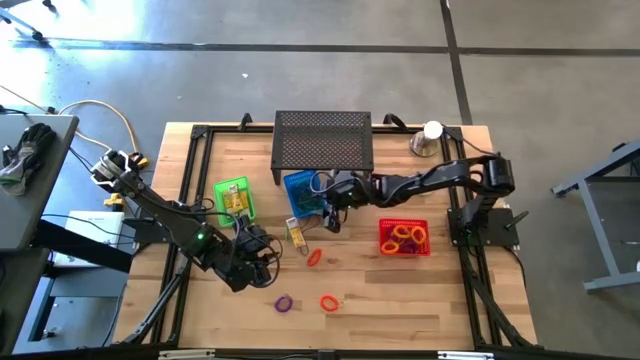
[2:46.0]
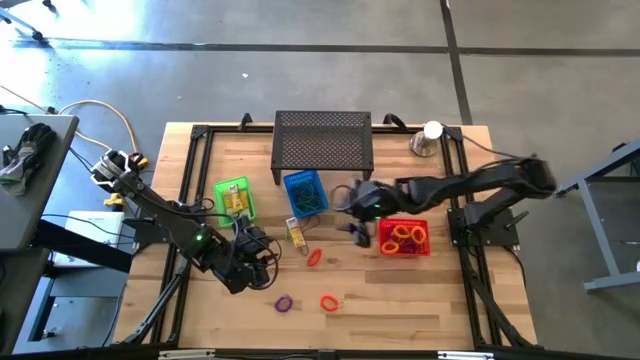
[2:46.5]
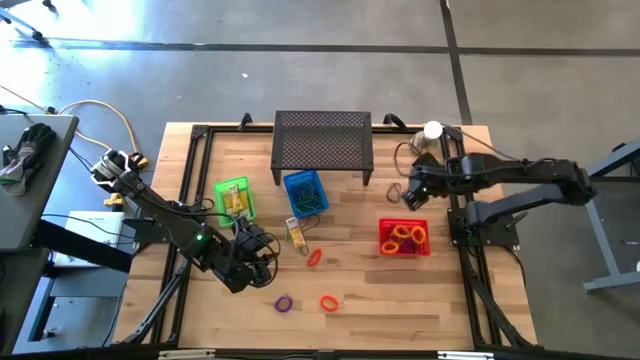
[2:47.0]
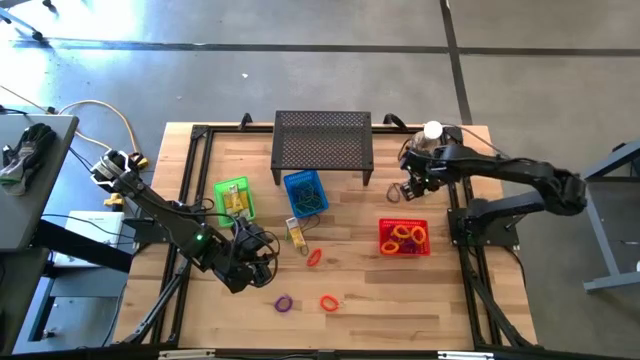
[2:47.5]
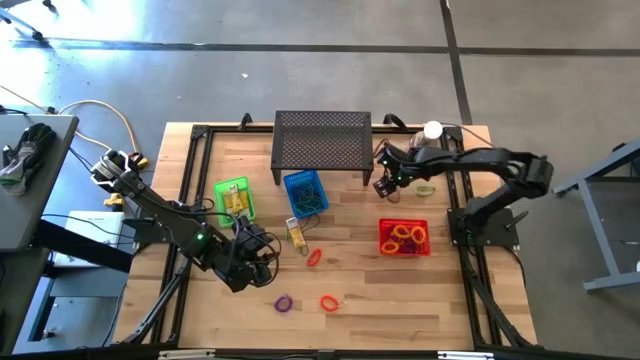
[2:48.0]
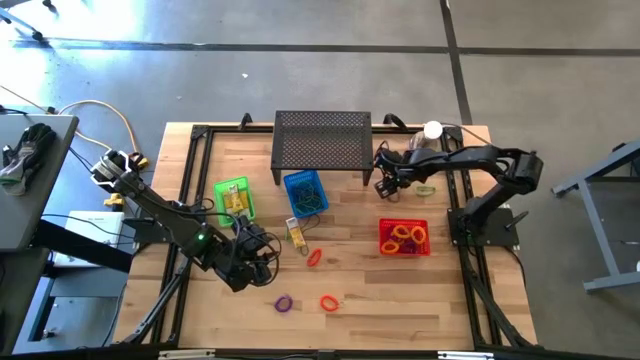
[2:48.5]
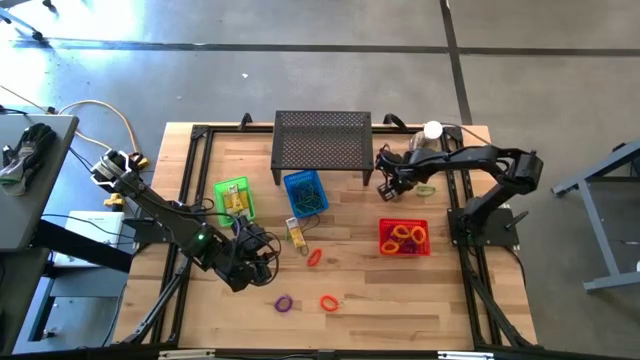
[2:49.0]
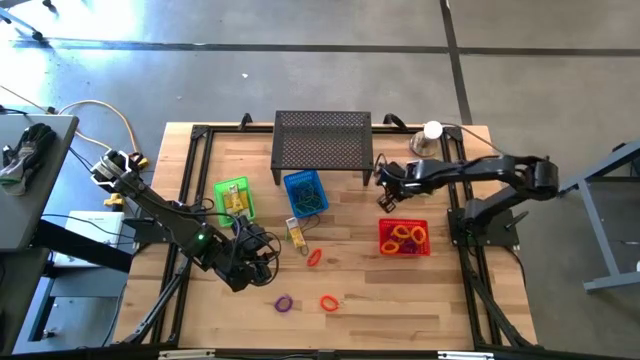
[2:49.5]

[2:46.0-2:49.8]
Task: Pick & Place Office Desk Supplies
Put the violet rubber band into the blue basket

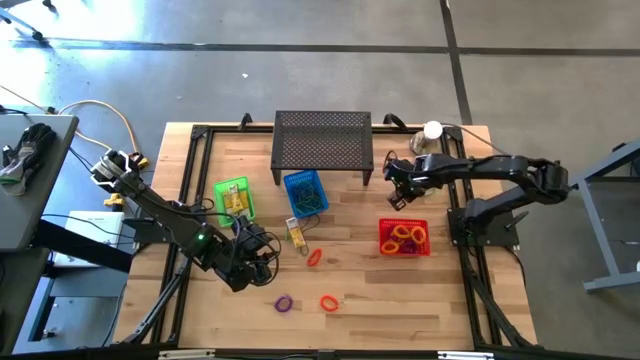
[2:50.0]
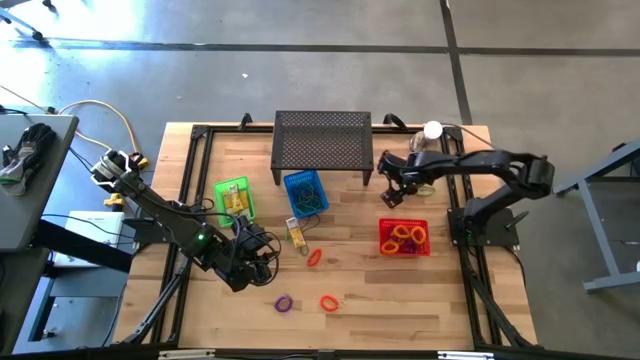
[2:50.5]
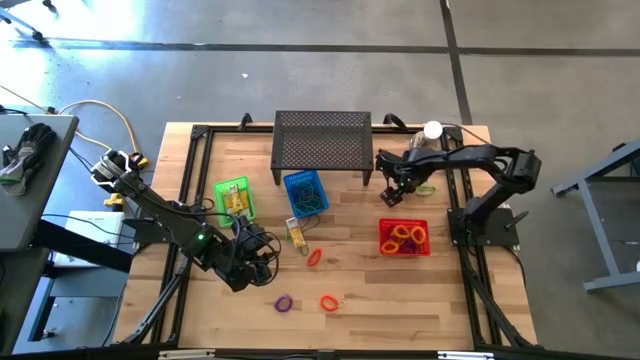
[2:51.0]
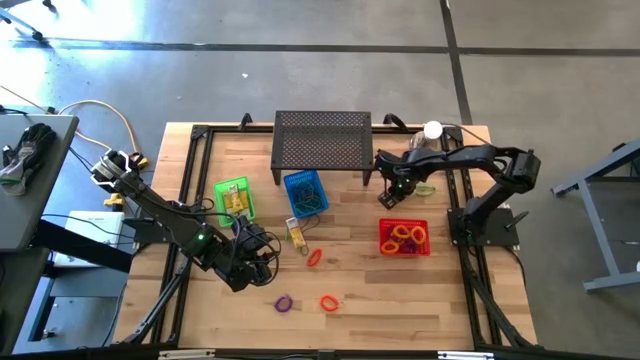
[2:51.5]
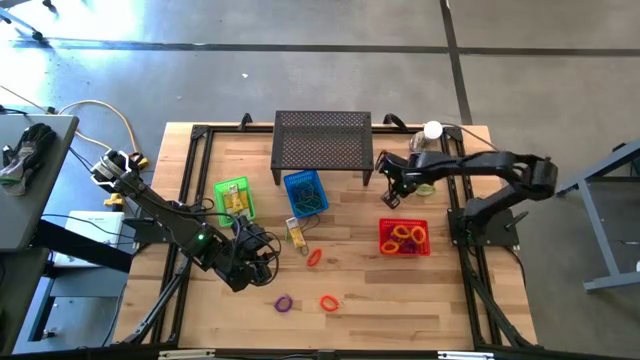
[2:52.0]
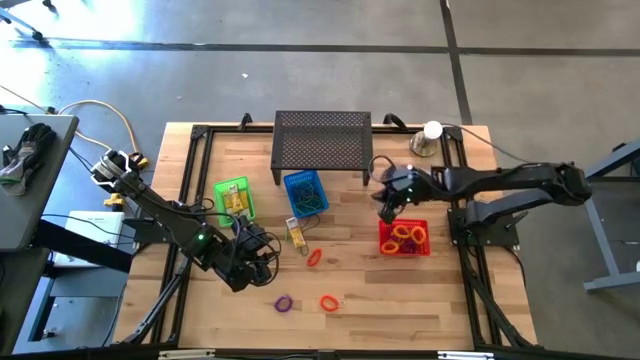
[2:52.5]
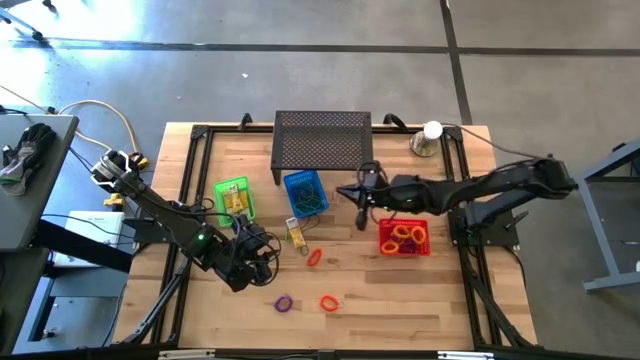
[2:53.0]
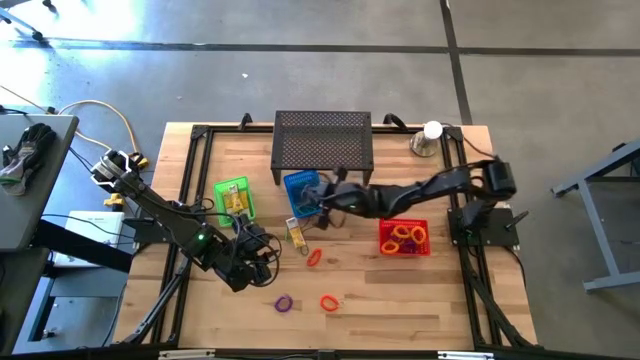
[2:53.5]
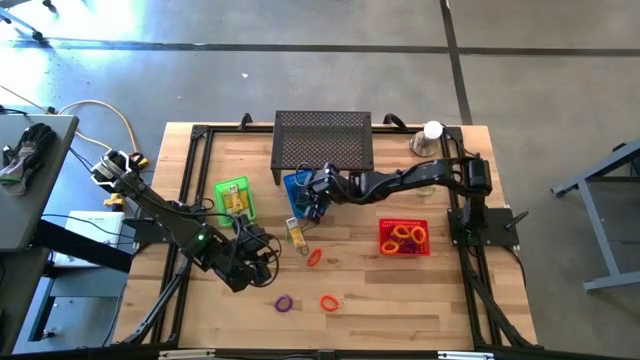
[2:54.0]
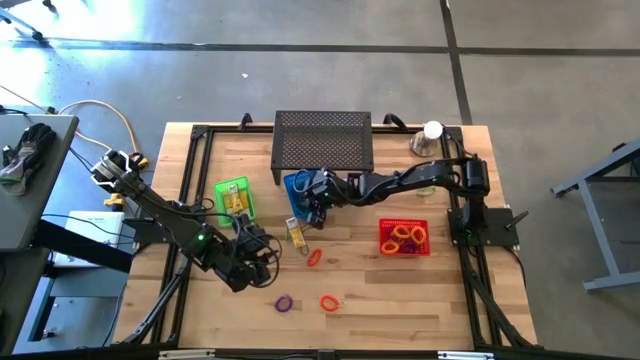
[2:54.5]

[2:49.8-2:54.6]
Put the violet rubber band into the blue basket

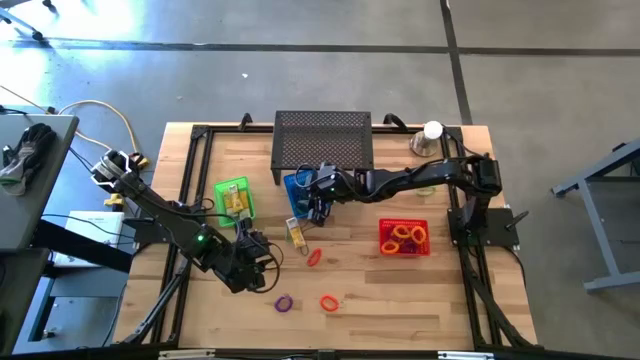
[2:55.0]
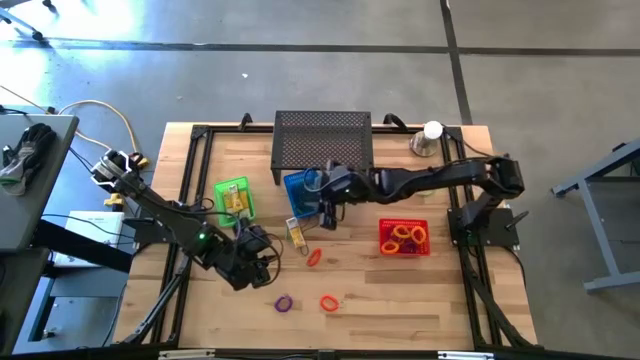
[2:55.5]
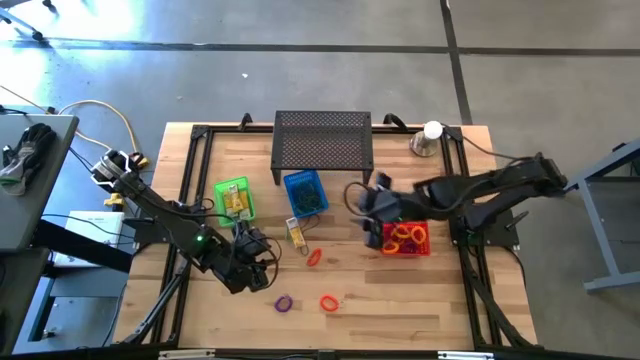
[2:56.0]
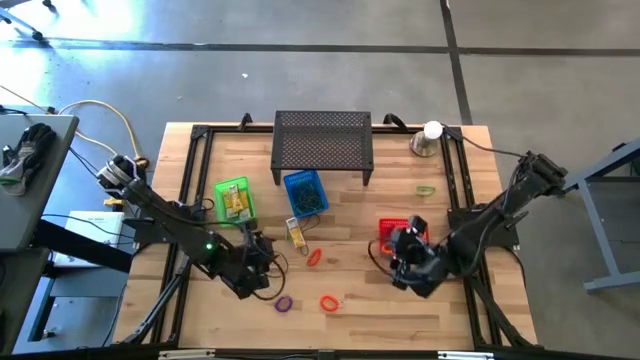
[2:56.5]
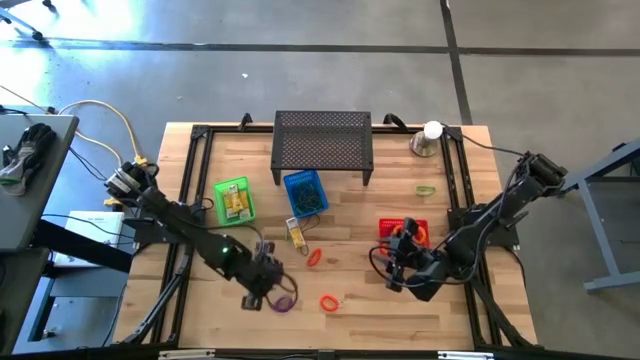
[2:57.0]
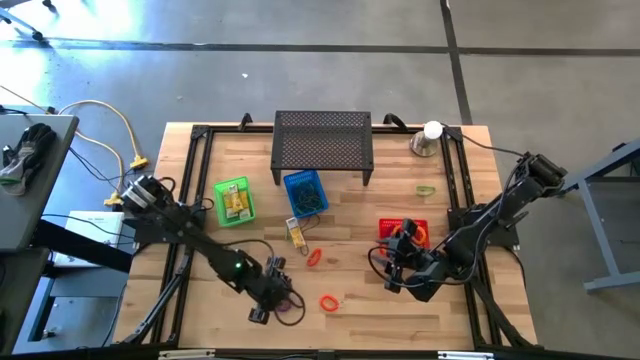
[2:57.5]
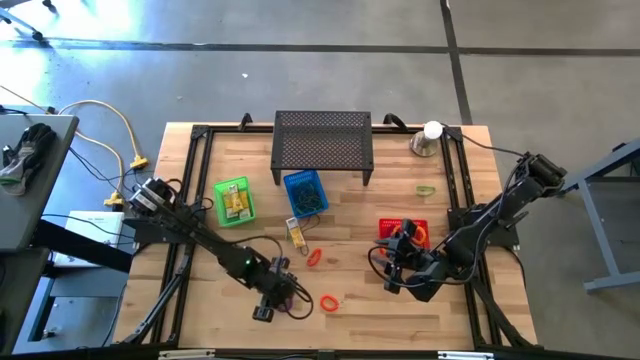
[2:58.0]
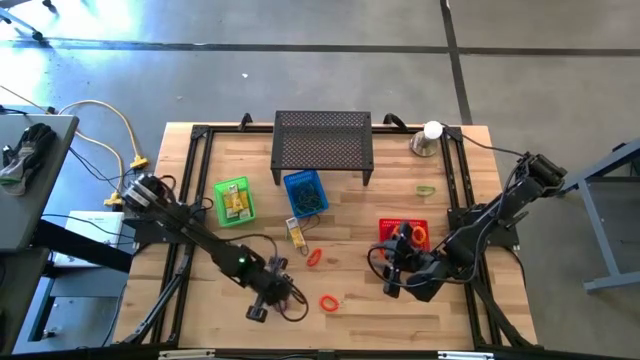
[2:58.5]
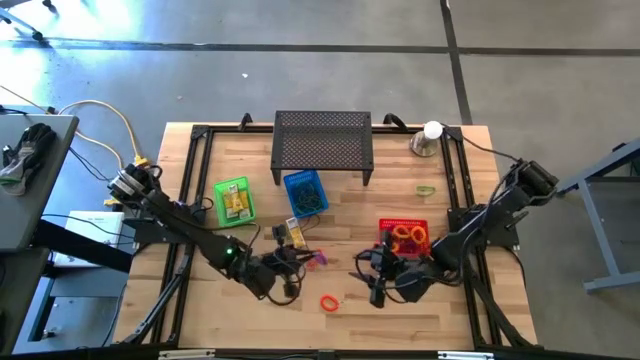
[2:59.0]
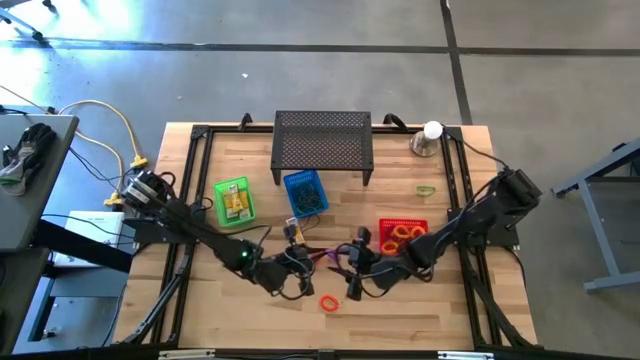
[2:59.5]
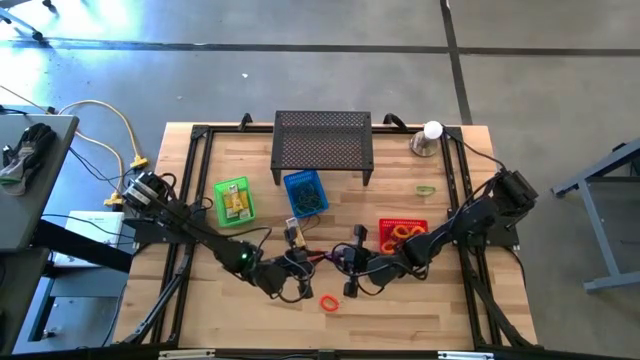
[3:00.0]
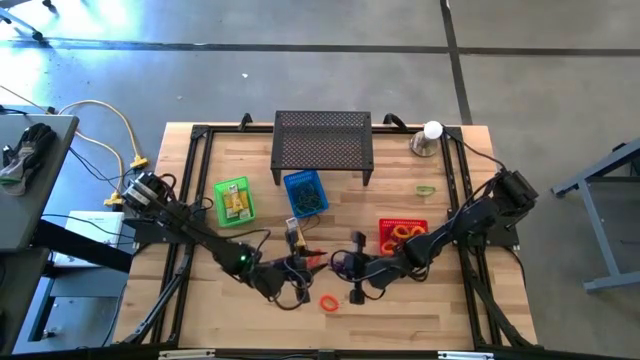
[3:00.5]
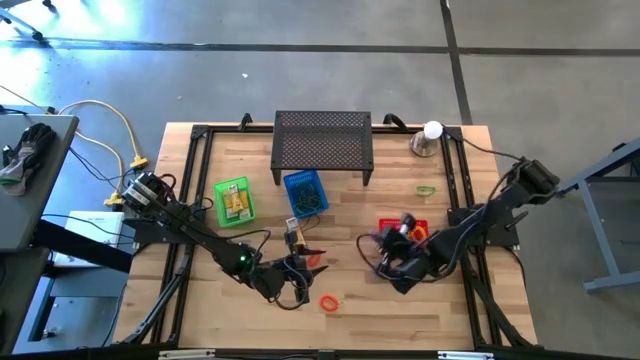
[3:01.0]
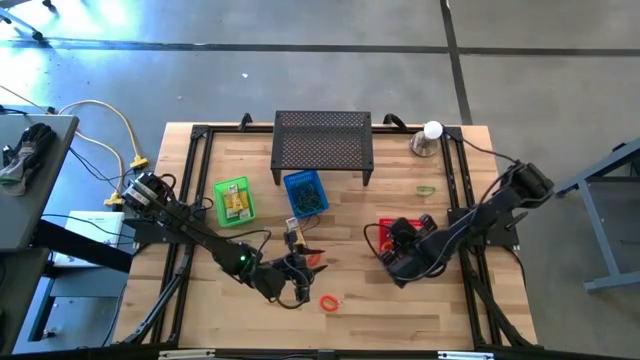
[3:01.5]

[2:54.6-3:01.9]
Put the violet spring keychain into the red basket

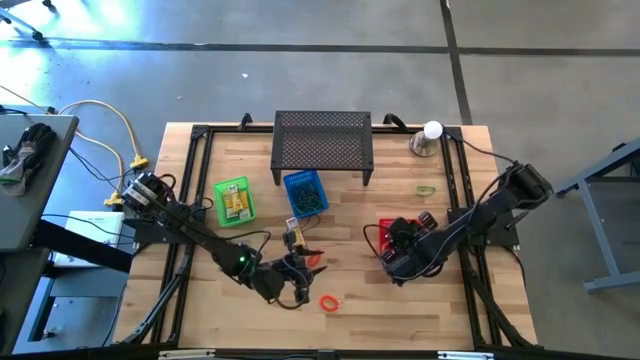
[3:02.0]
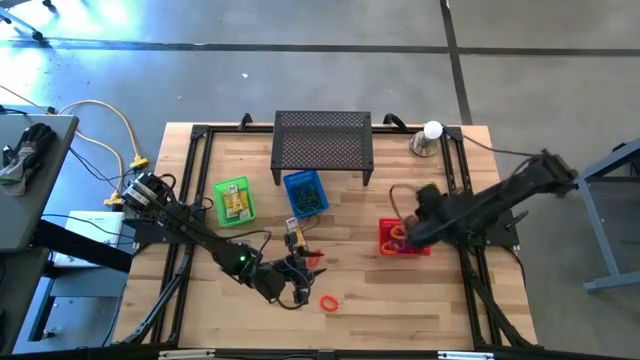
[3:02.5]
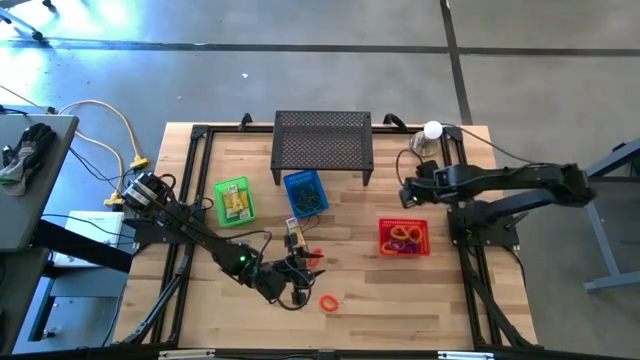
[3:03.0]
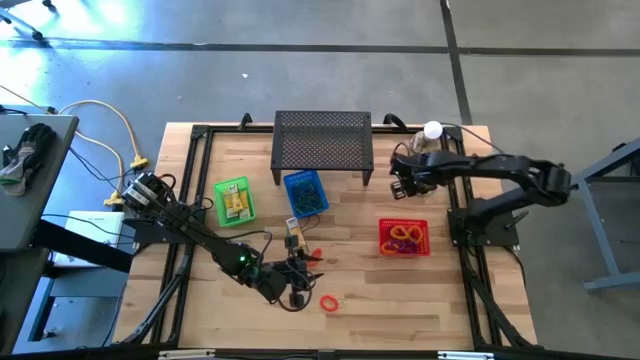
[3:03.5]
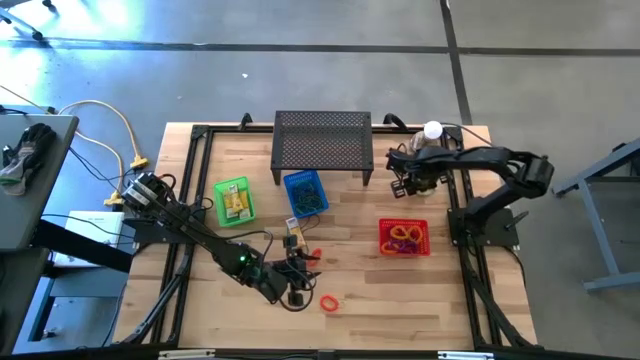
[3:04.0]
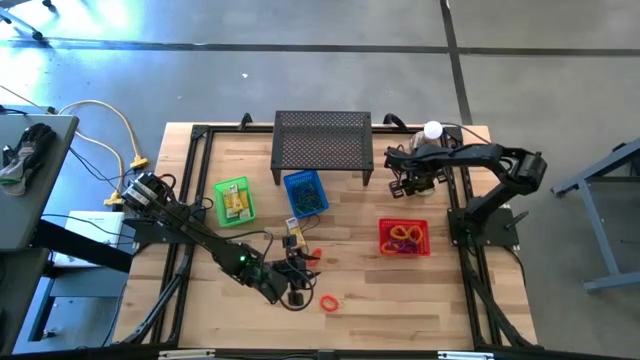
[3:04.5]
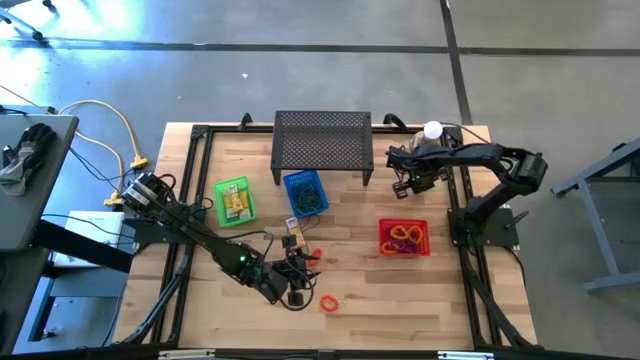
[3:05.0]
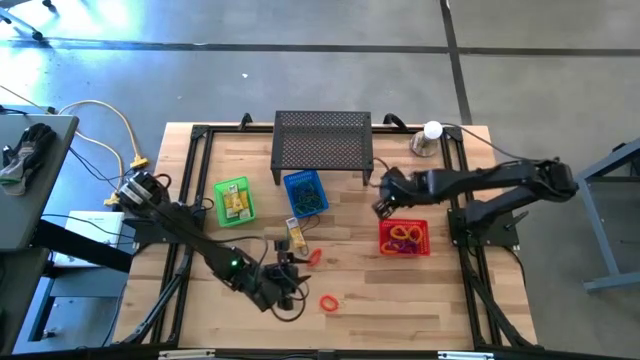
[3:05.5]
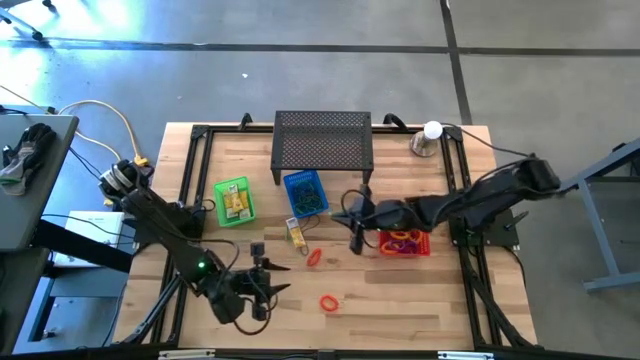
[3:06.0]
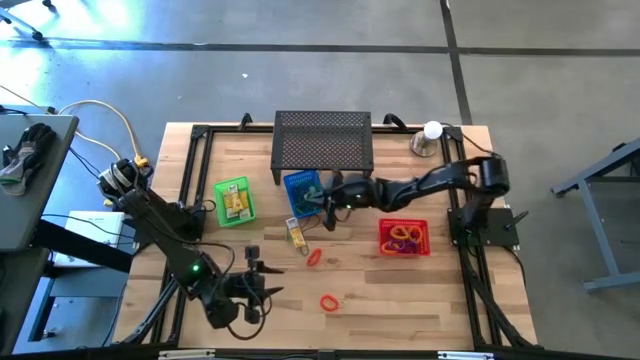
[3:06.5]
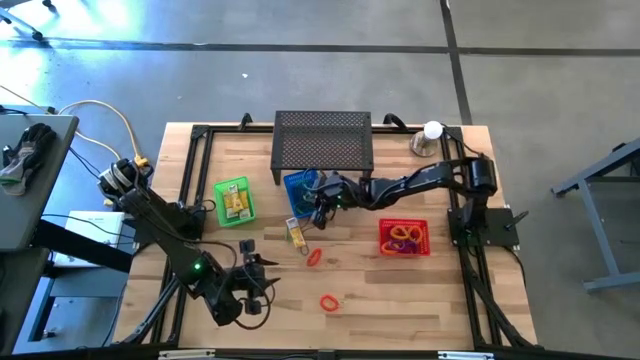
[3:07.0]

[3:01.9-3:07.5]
Put the green rubber band into the blue basket
